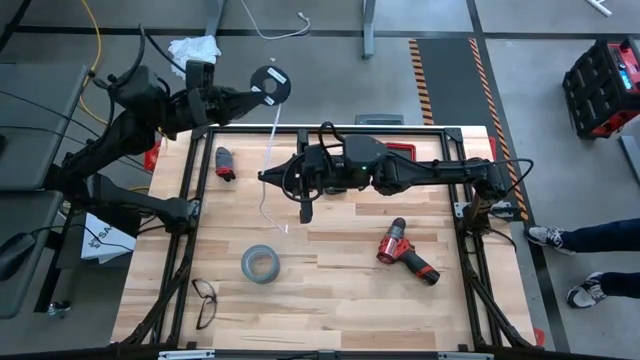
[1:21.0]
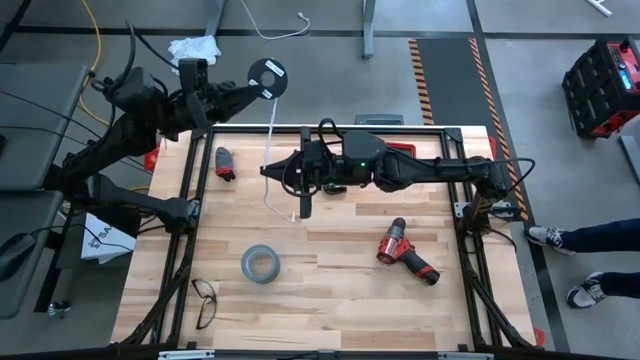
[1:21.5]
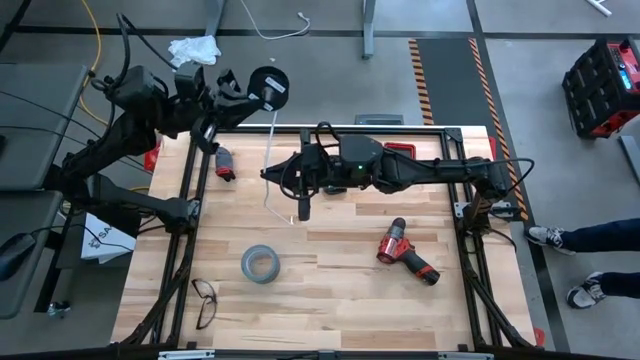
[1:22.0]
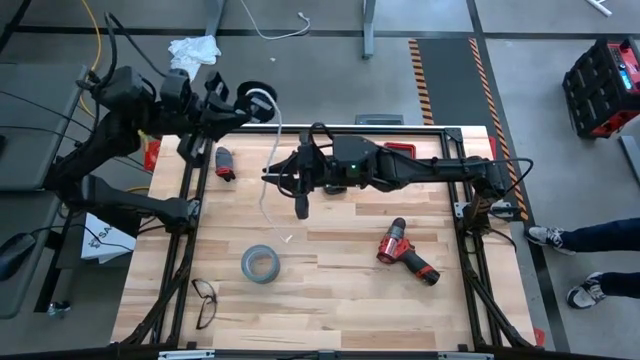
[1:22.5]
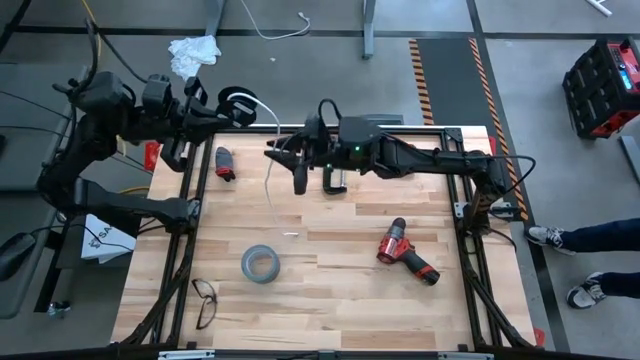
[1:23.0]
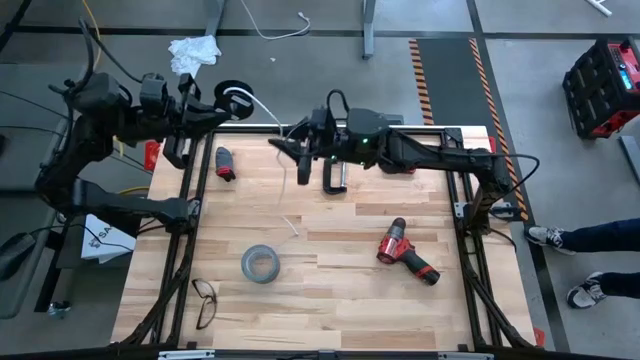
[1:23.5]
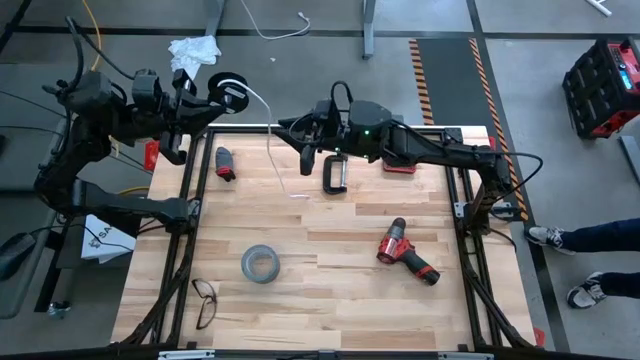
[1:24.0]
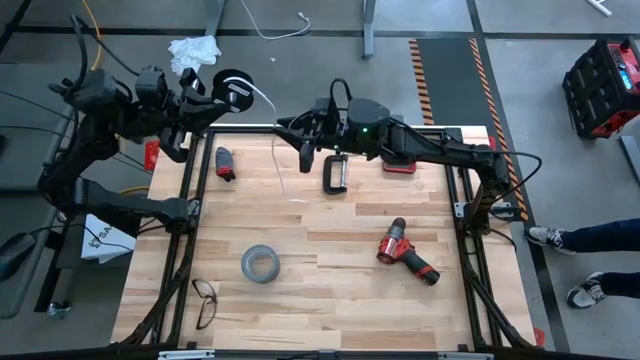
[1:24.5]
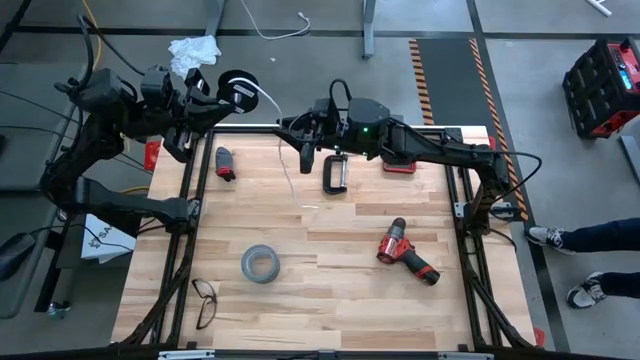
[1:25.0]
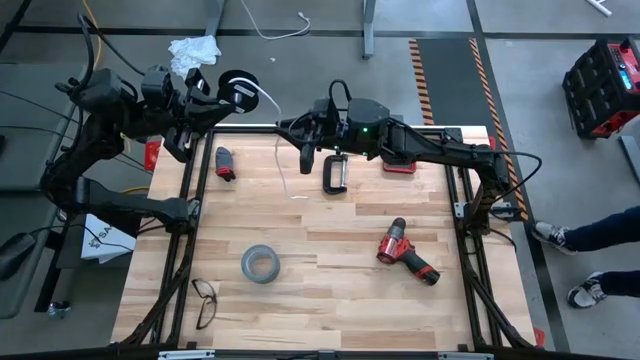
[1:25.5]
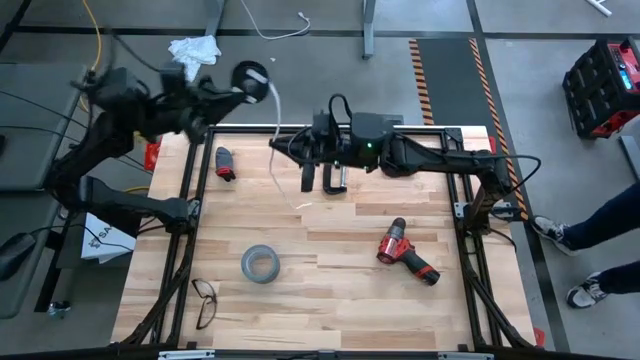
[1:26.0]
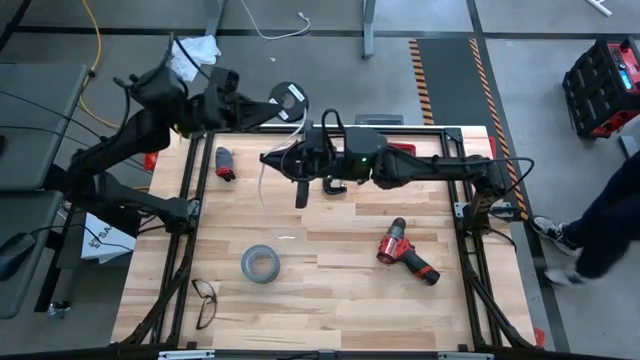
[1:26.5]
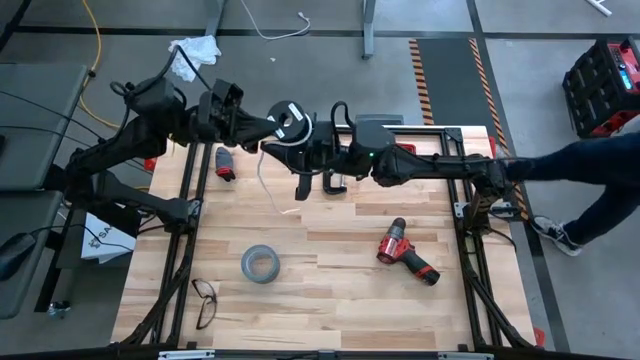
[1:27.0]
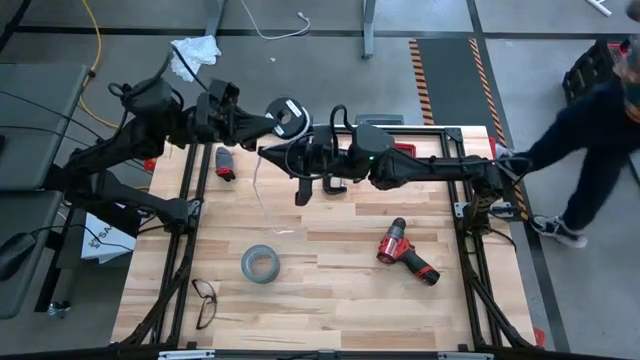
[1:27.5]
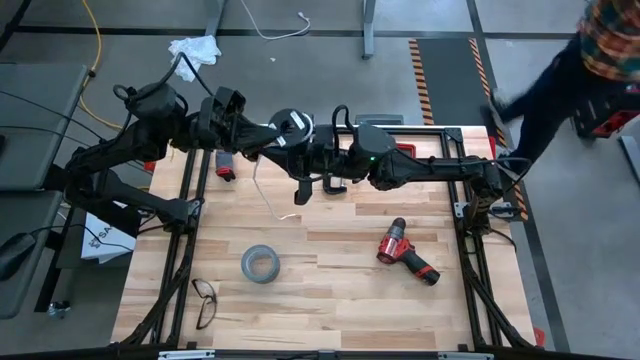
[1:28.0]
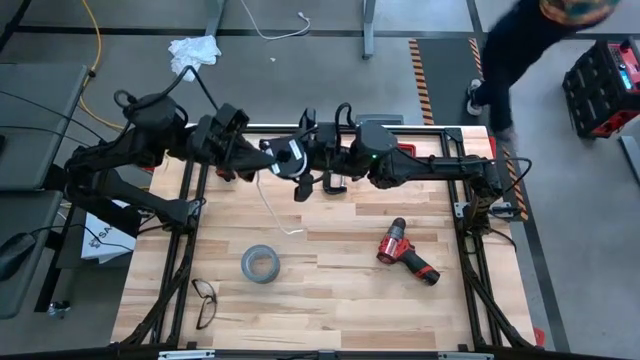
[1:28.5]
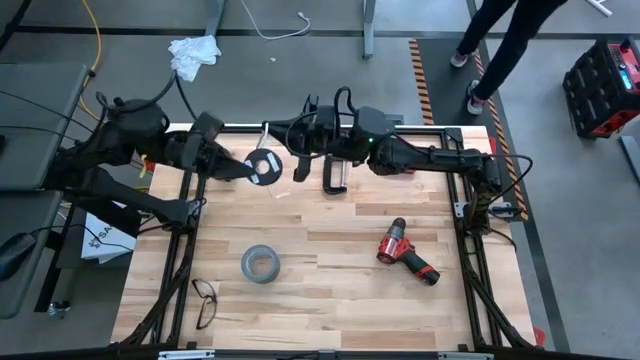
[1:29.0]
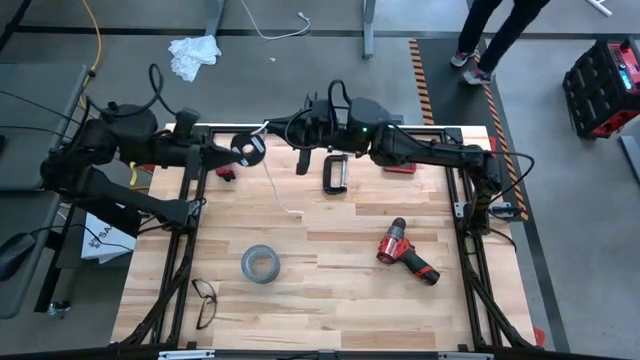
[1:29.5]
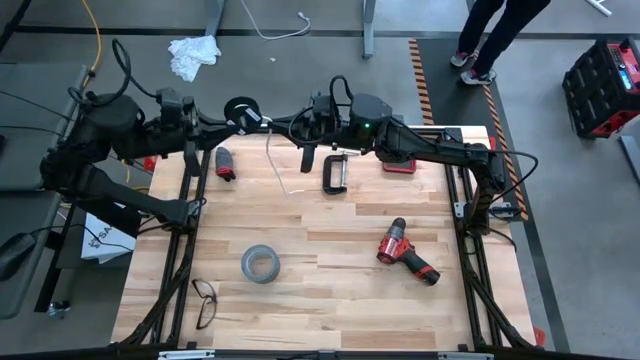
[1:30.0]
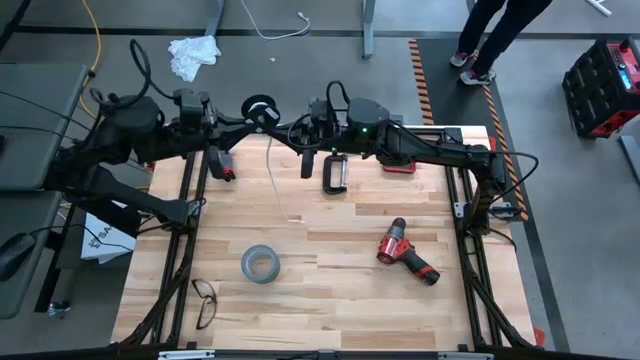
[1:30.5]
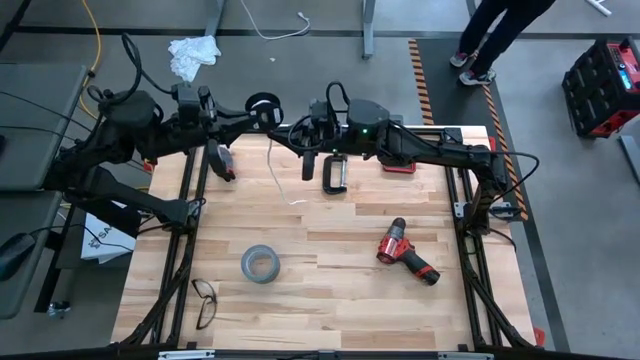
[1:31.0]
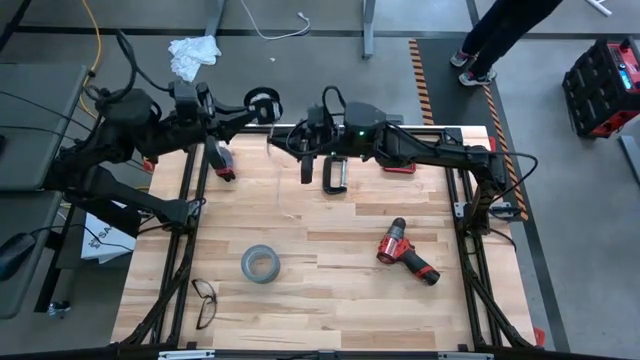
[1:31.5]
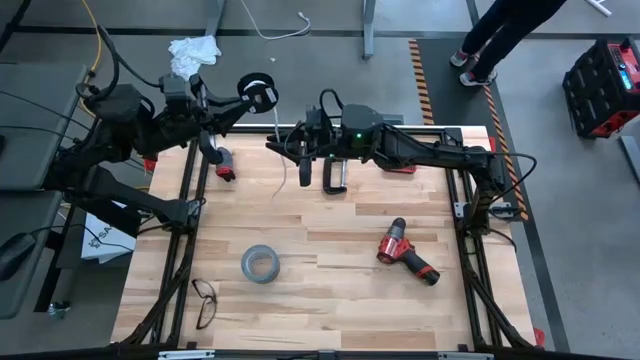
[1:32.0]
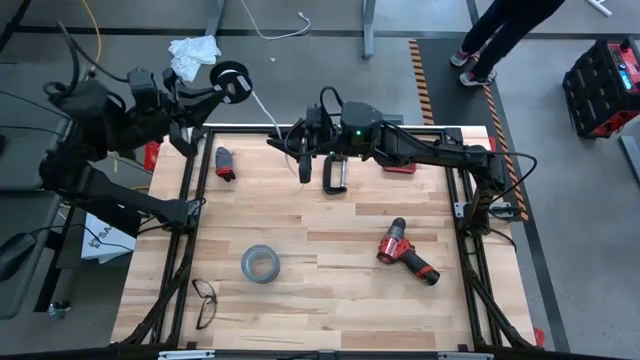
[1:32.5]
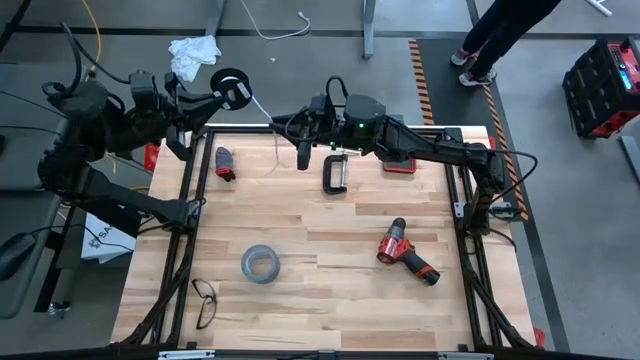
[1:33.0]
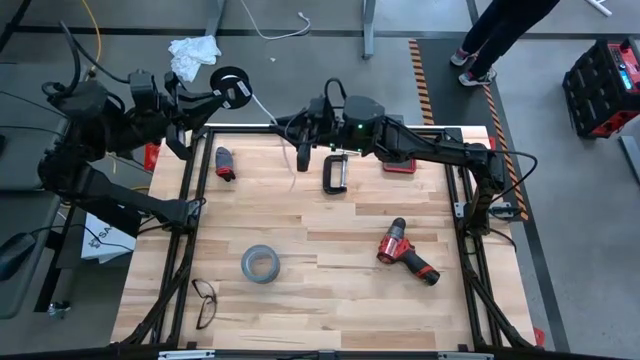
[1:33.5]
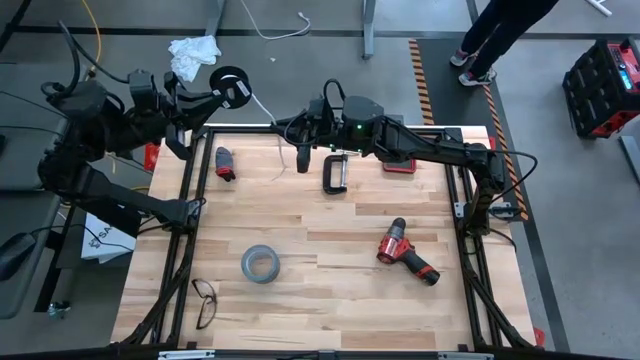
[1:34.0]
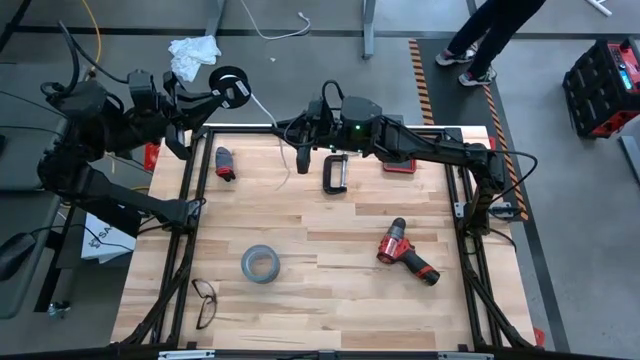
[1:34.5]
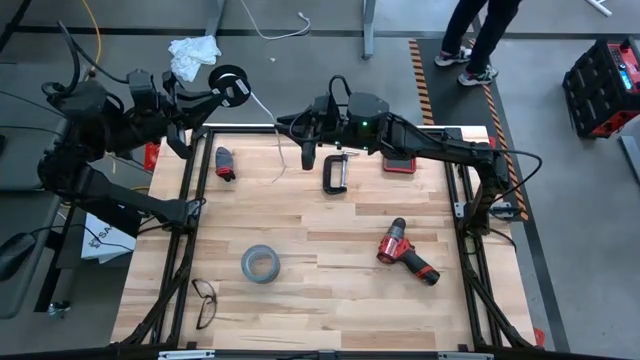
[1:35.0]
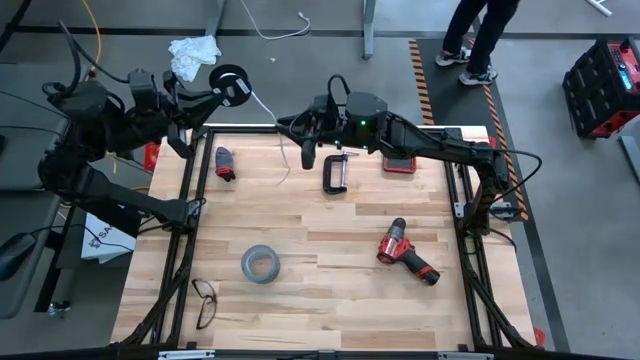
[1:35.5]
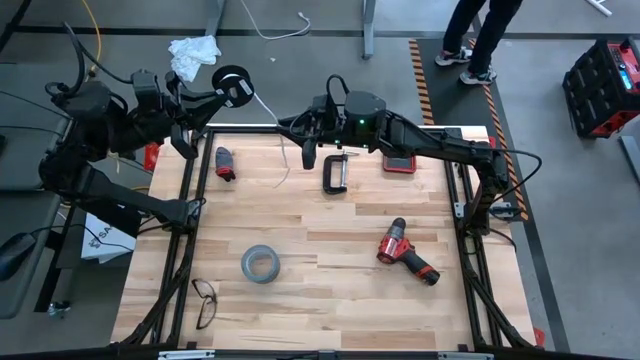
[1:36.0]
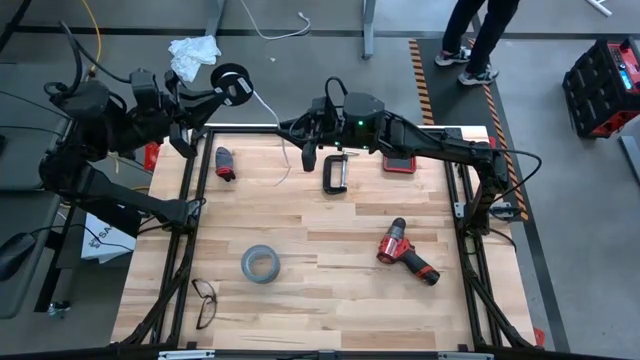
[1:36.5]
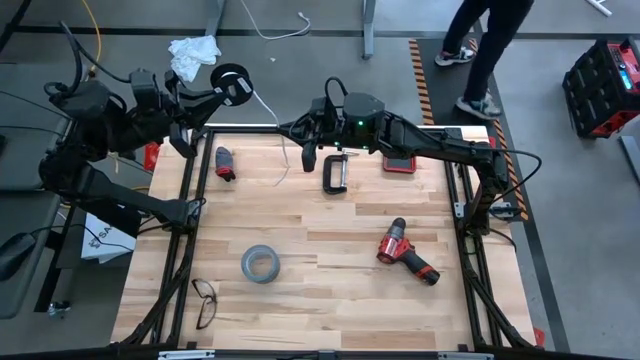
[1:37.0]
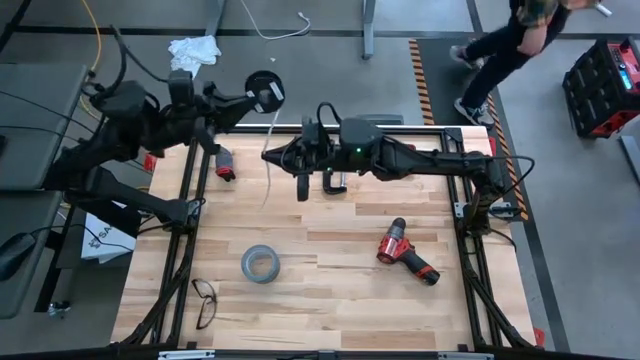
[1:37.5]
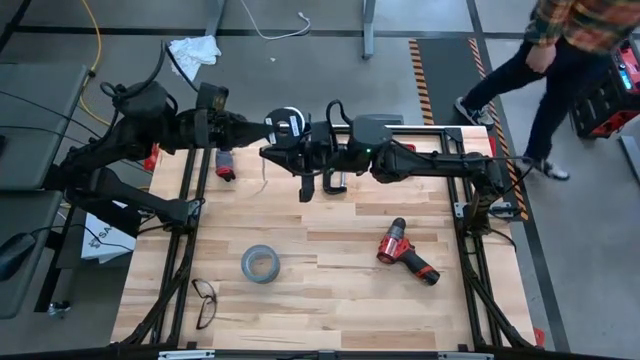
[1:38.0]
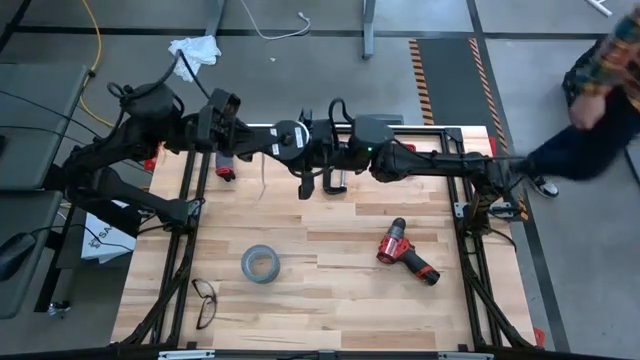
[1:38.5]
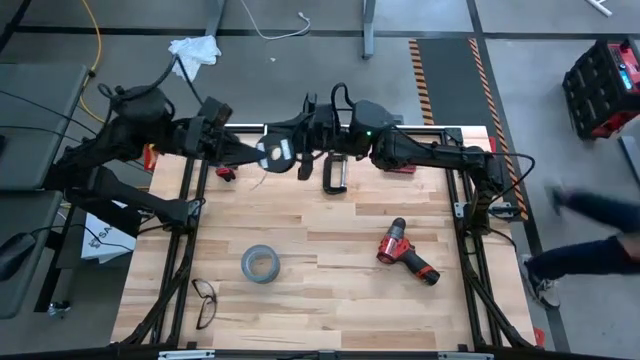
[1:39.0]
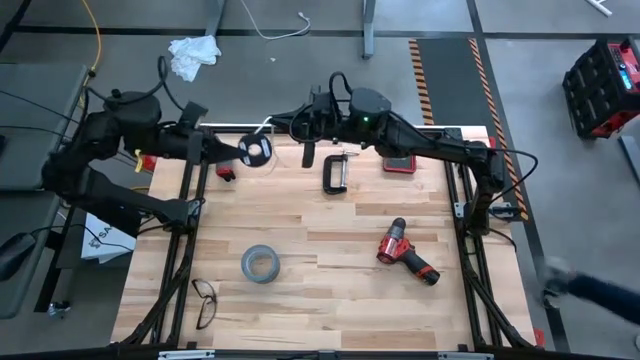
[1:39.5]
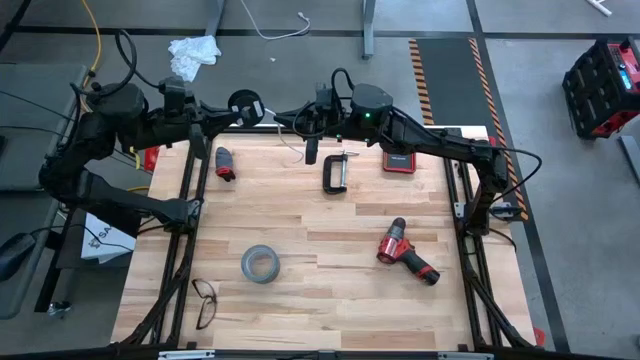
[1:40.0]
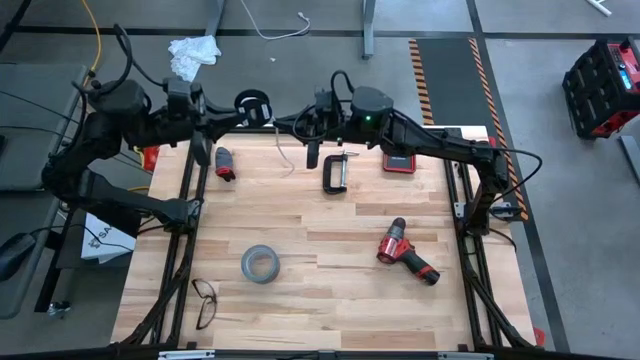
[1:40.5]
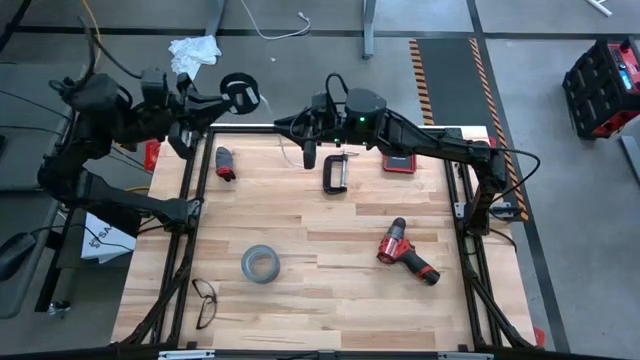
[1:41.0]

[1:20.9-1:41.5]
Task: Coil cords
Coil the white wire

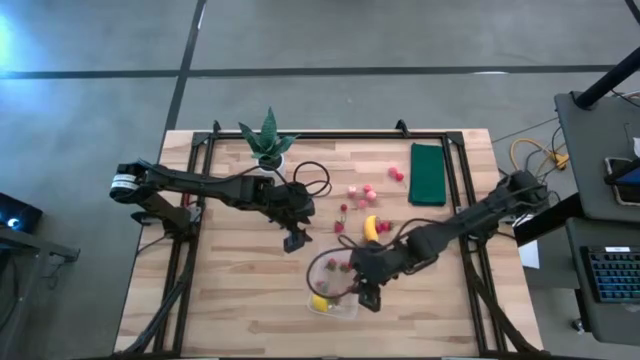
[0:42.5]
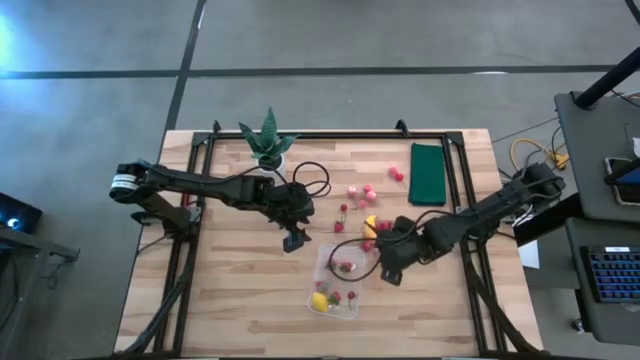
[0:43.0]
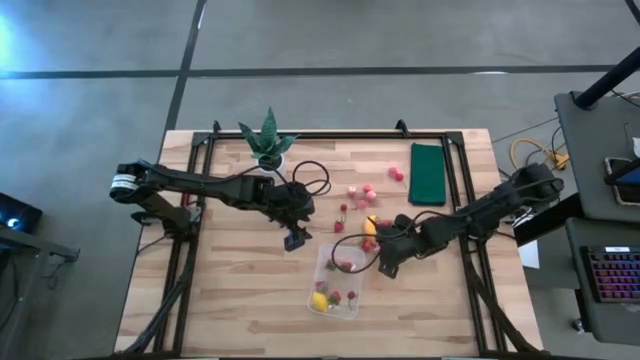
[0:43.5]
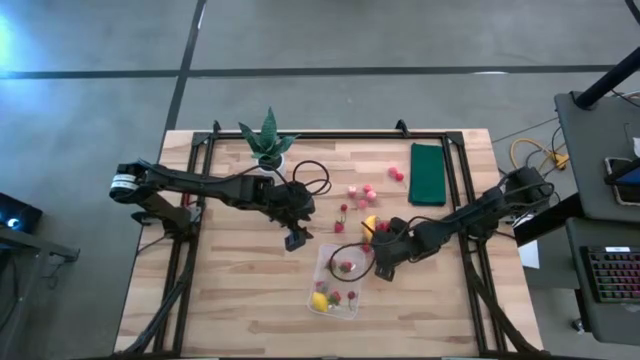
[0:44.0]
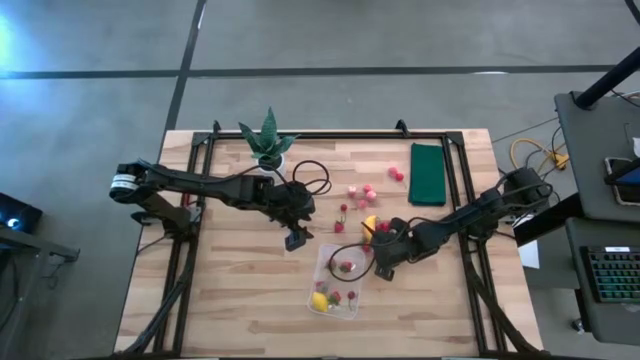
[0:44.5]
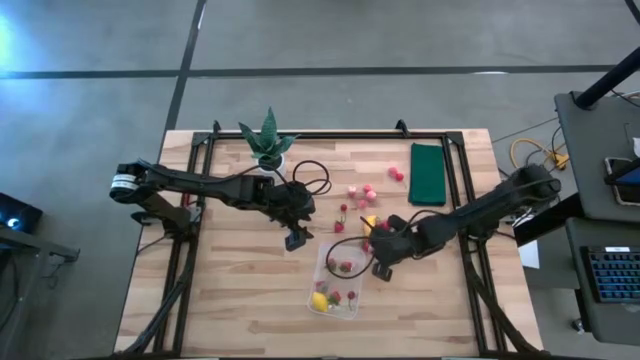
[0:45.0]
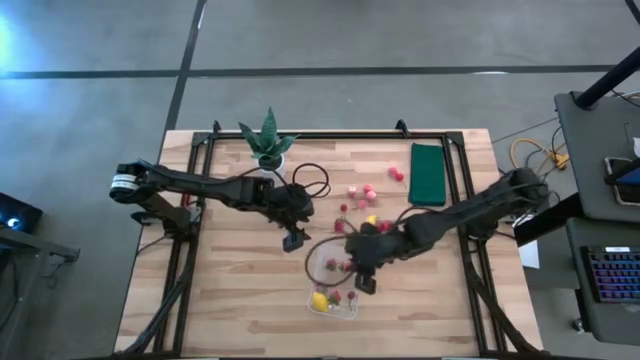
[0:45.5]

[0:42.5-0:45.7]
Task: Pick and placing Produce into tupperware
Put the peach into the transparent bin
